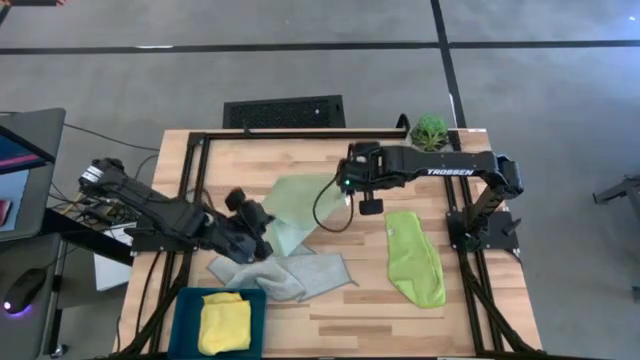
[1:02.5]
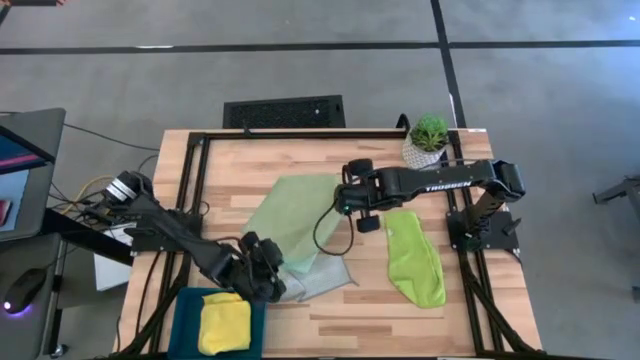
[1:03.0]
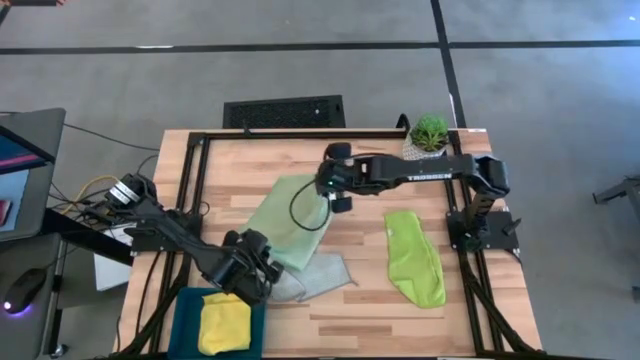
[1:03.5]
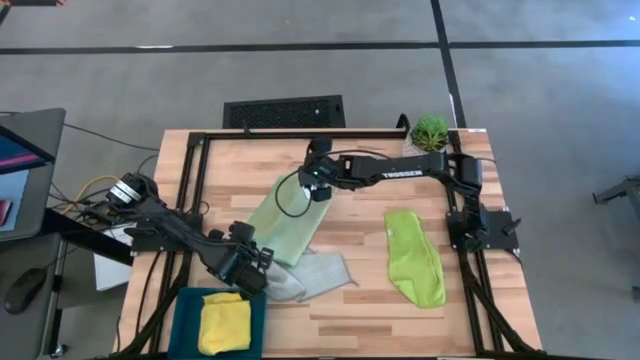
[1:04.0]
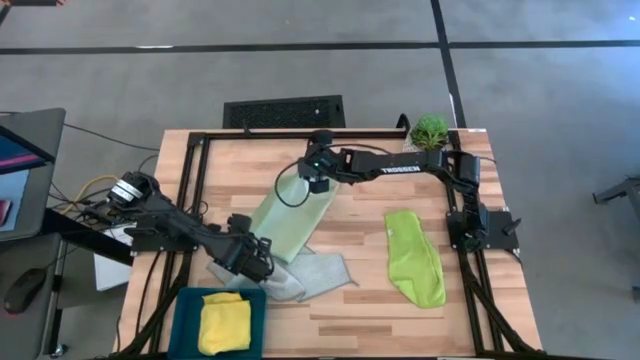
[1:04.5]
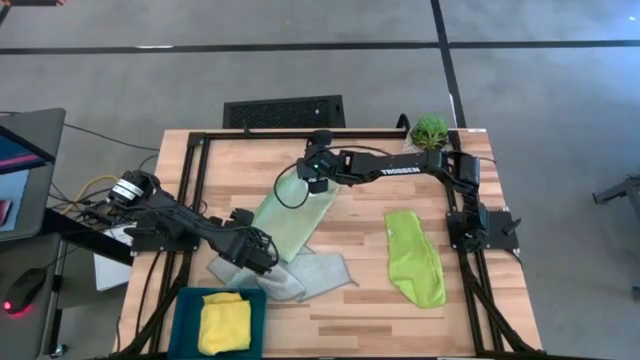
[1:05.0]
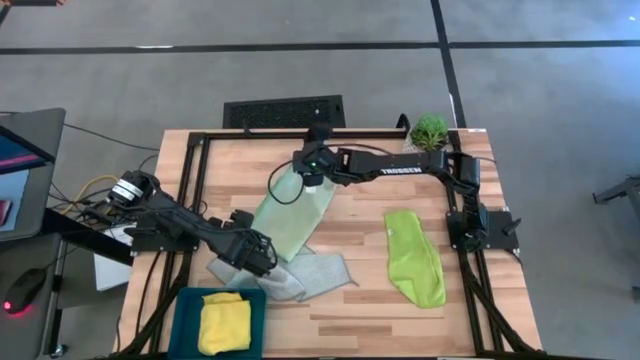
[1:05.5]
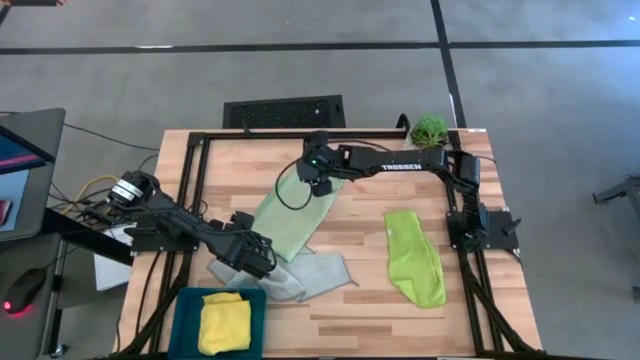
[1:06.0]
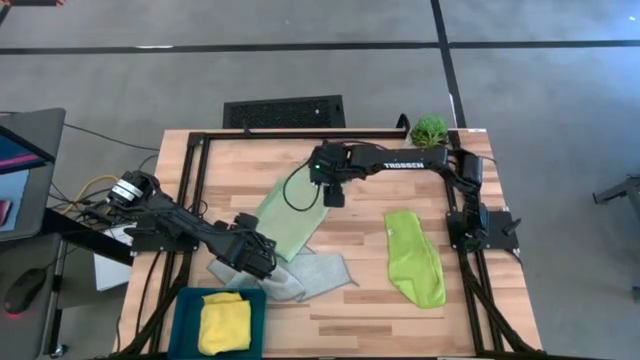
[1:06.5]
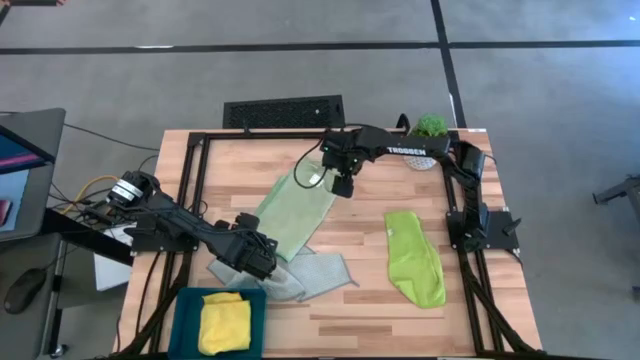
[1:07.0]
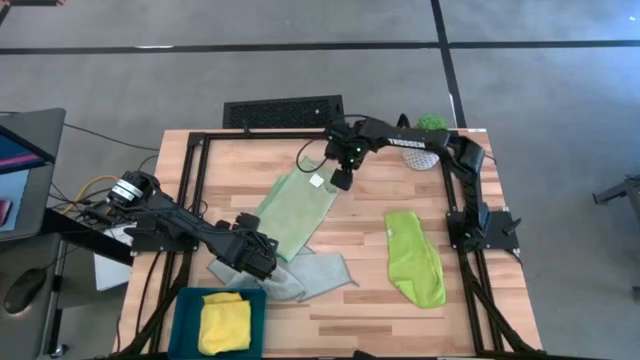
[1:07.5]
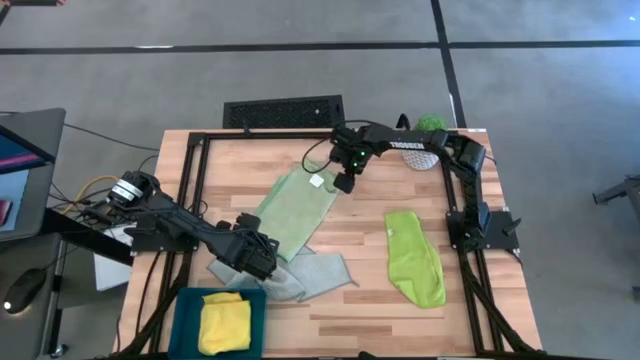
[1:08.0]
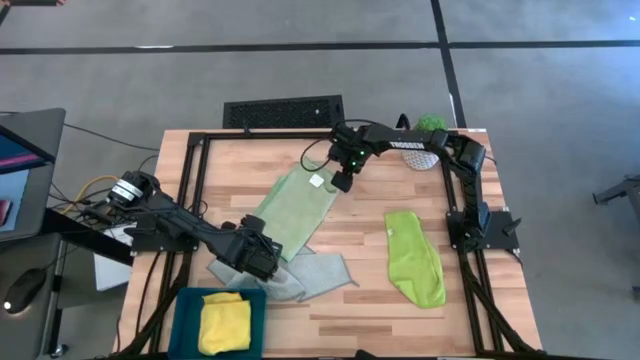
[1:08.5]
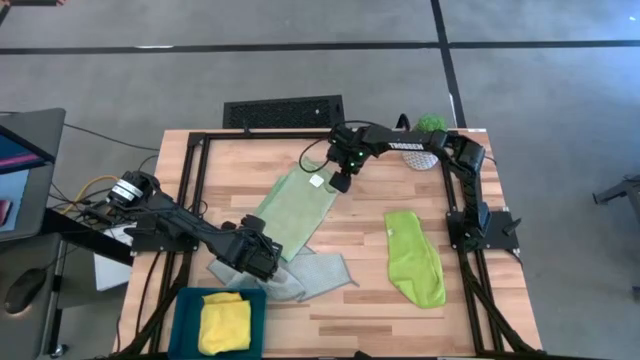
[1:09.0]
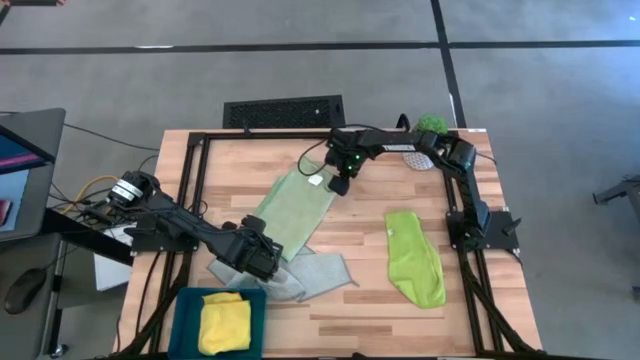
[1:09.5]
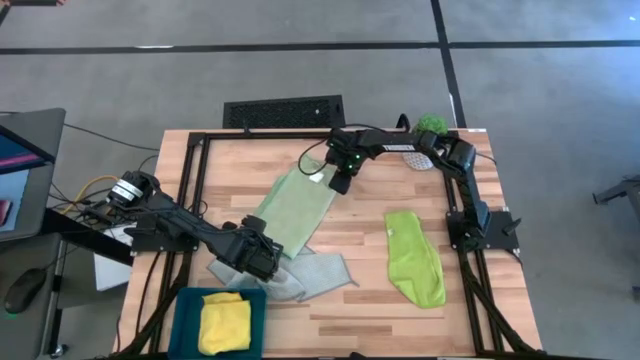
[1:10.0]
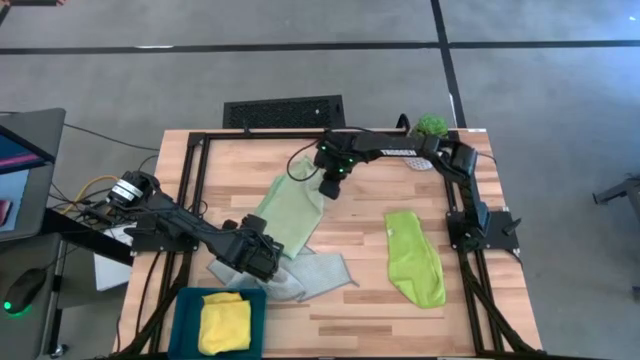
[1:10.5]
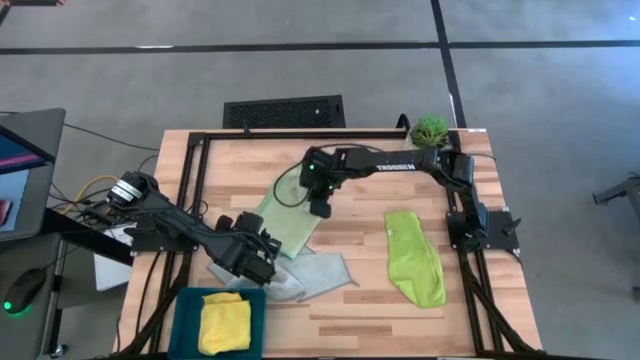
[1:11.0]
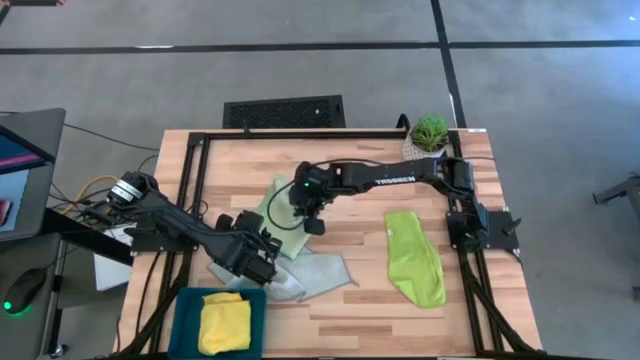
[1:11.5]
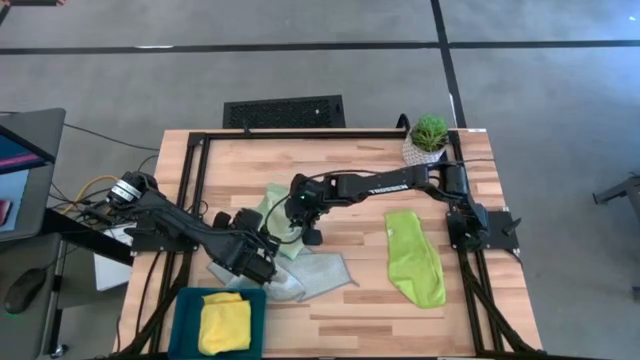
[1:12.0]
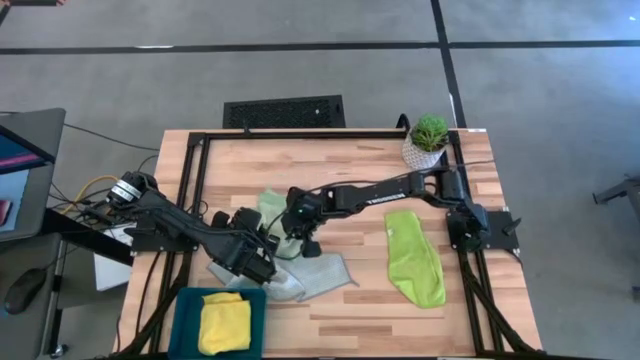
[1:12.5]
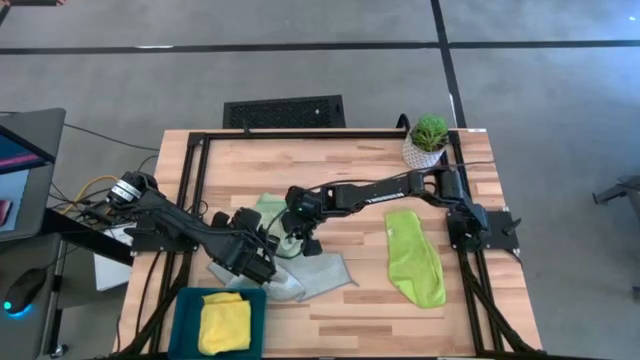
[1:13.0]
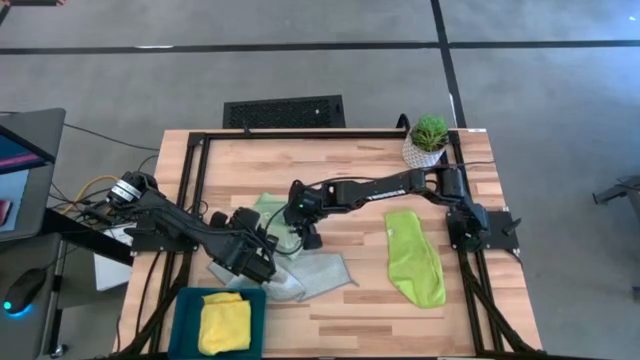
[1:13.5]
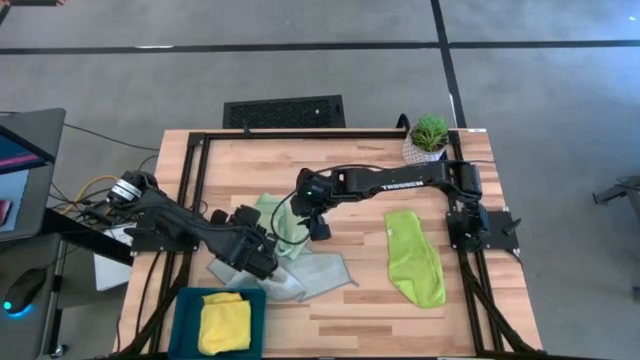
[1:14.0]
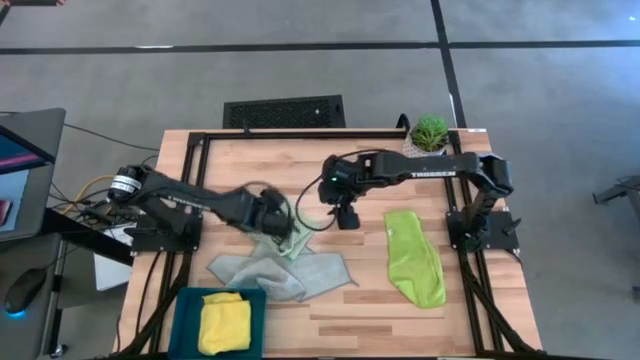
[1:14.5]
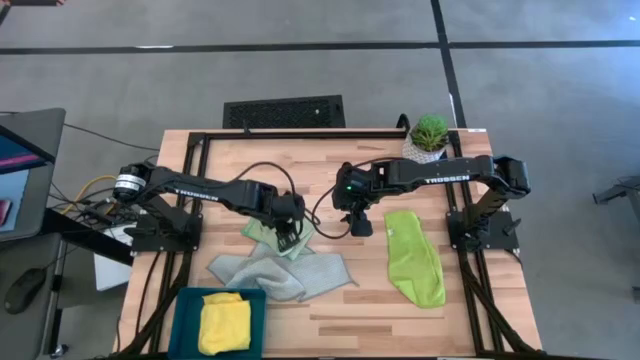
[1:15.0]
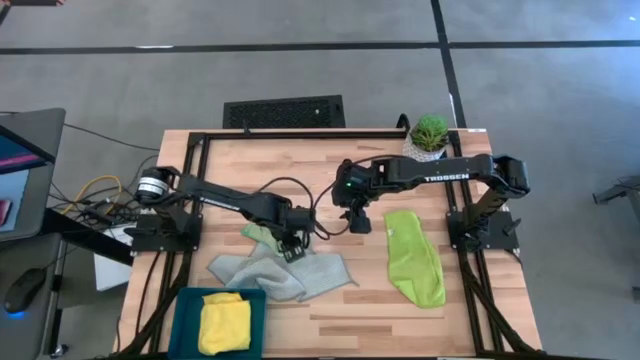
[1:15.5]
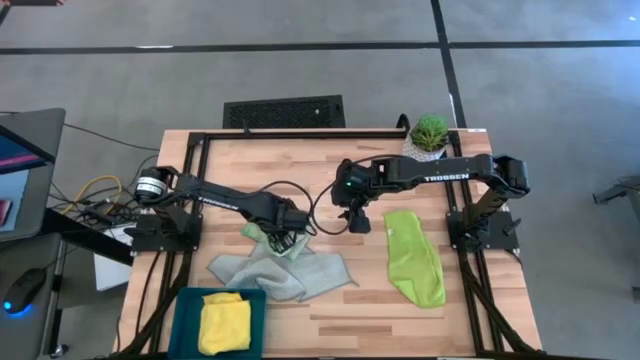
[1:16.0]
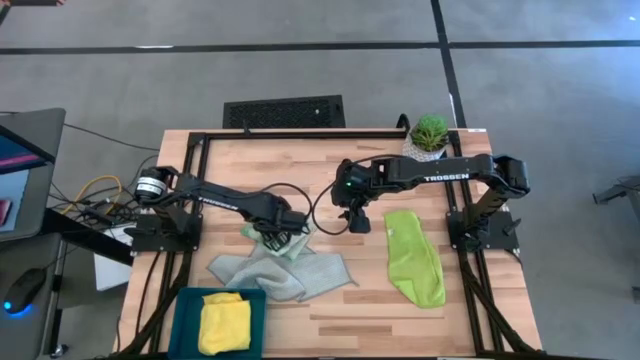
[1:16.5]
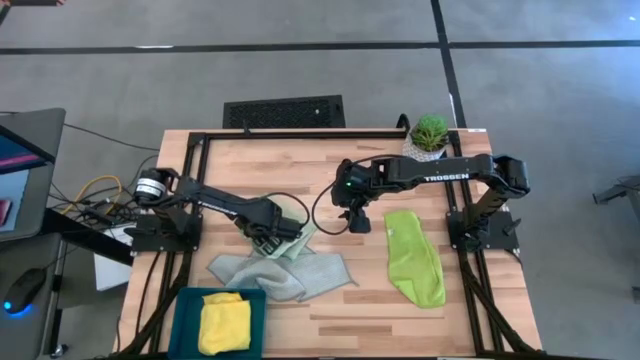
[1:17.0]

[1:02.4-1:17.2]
Task: Fold microfiber towels
Fold the light green microfiber cloth

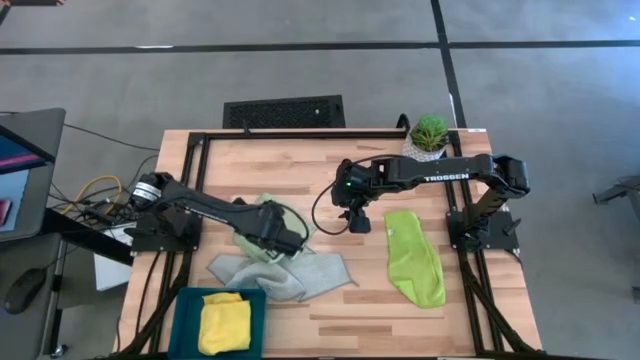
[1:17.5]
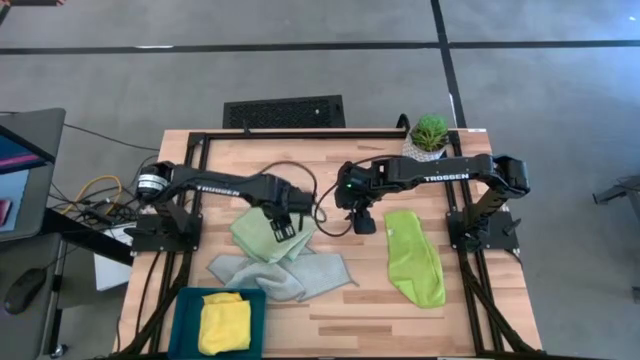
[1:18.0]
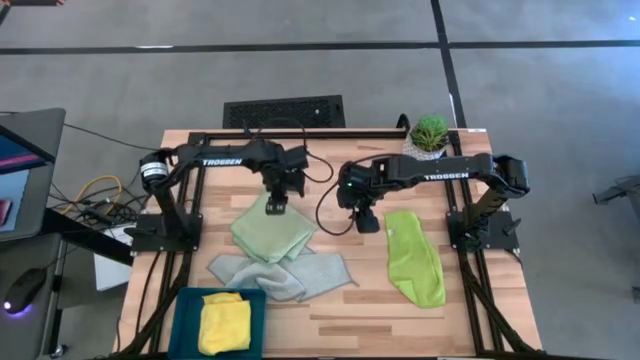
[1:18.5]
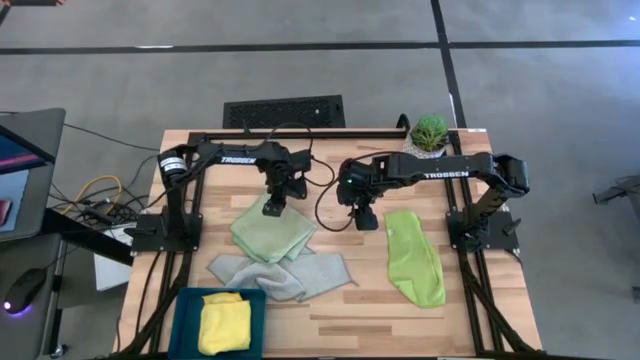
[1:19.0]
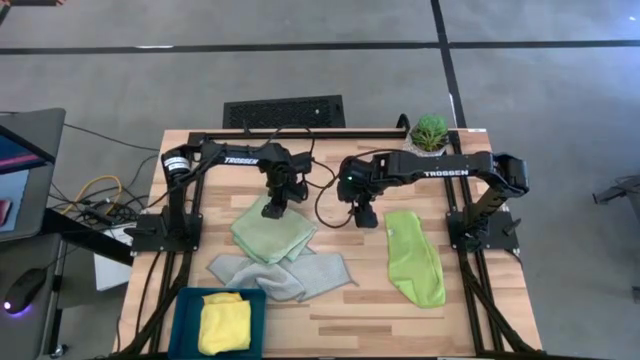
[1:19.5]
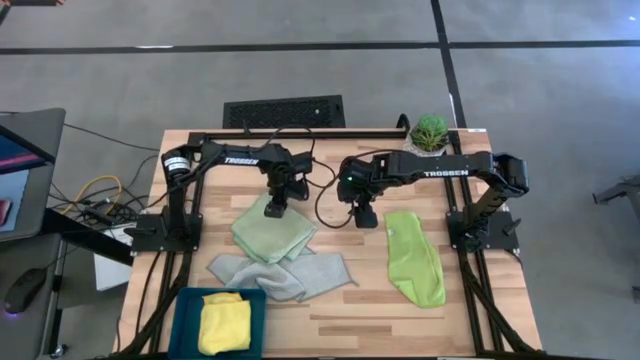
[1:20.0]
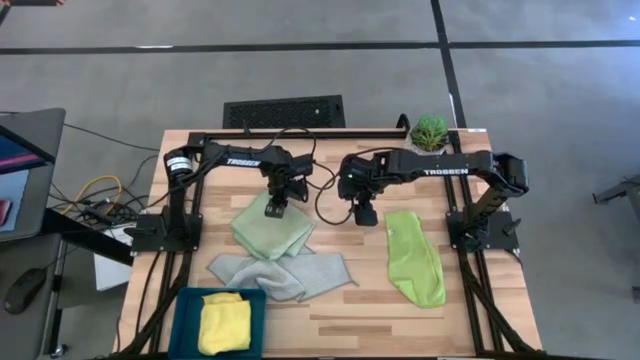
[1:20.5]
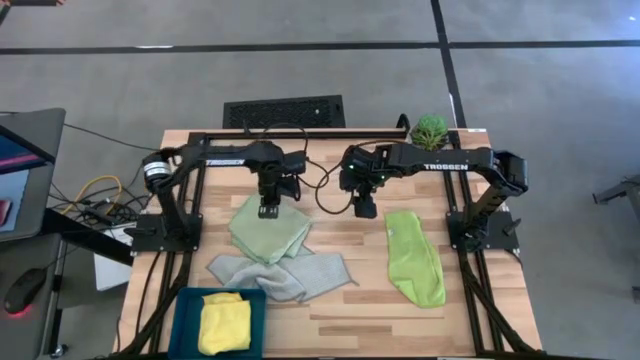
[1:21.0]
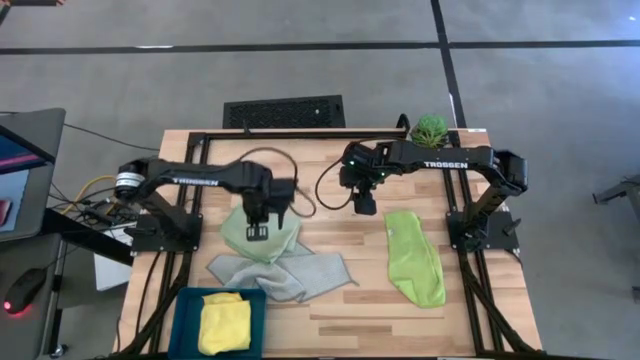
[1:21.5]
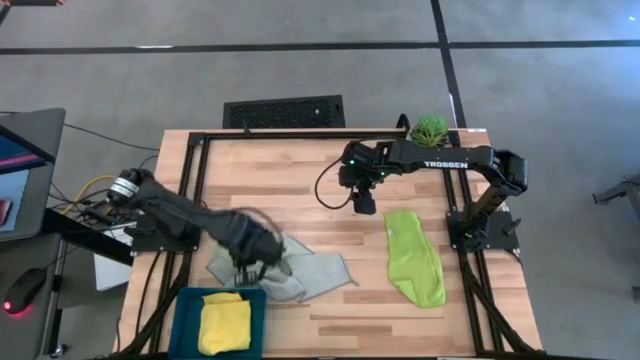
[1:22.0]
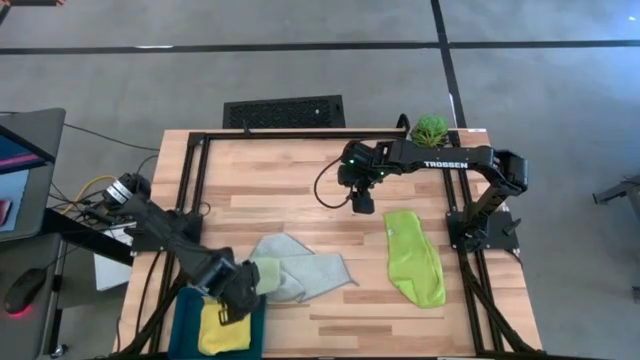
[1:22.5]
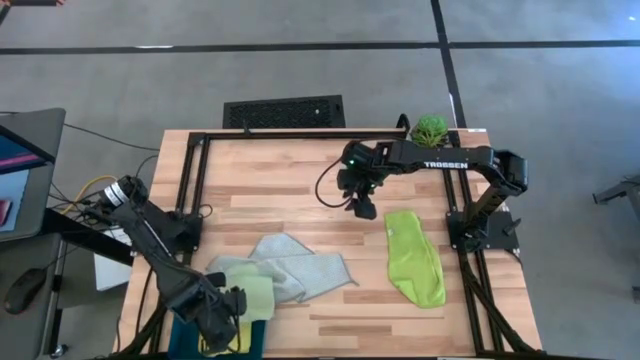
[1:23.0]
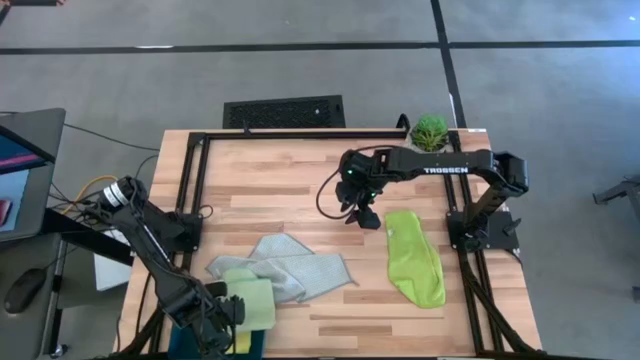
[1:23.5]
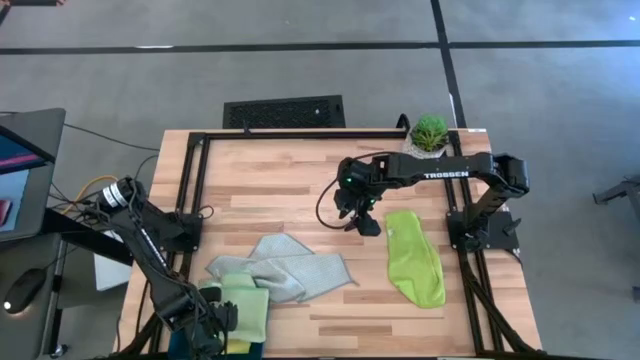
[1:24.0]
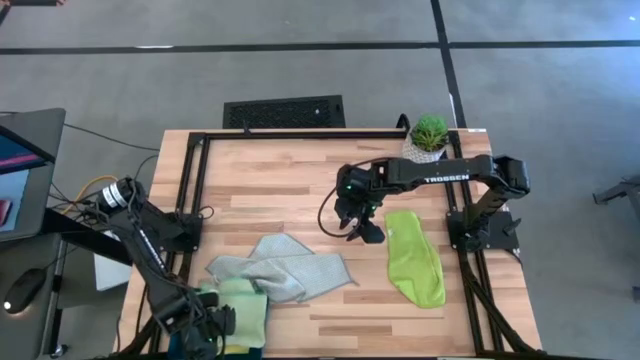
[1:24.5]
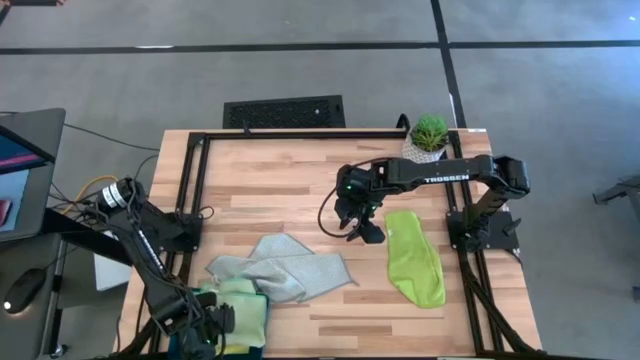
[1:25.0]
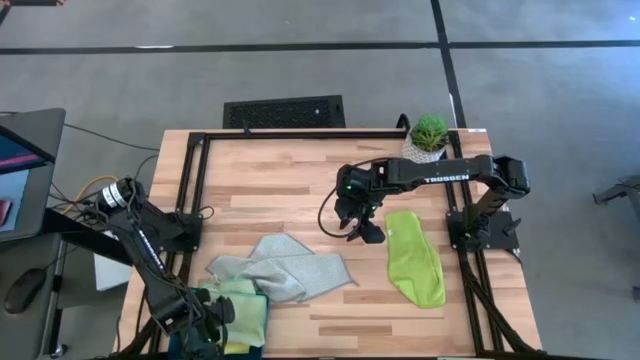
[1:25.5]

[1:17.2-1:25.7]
Put the folded light green microfiber cloth into the blue bin
